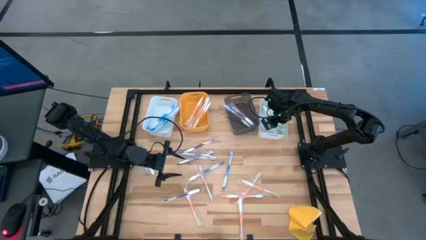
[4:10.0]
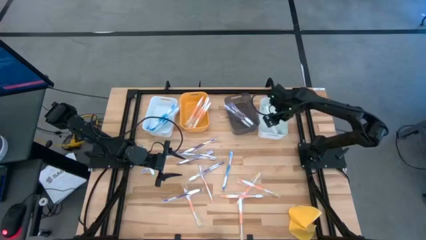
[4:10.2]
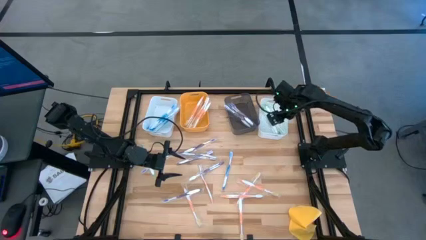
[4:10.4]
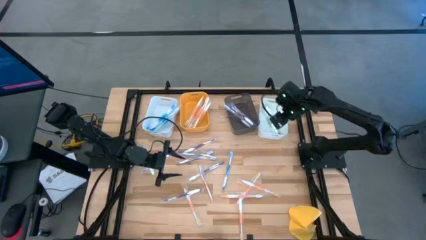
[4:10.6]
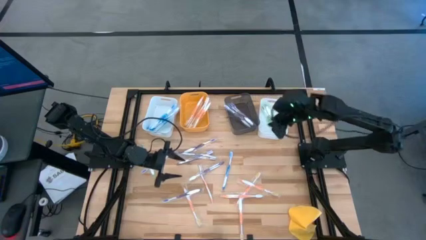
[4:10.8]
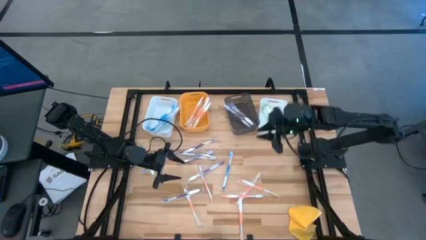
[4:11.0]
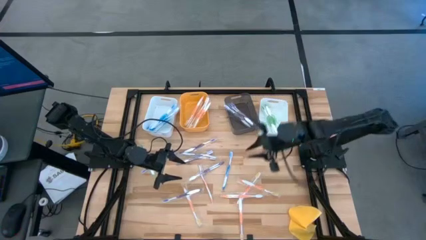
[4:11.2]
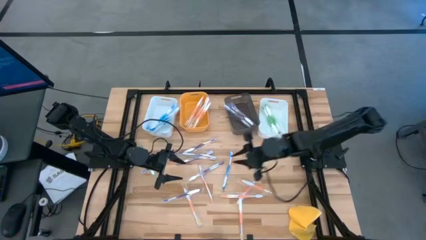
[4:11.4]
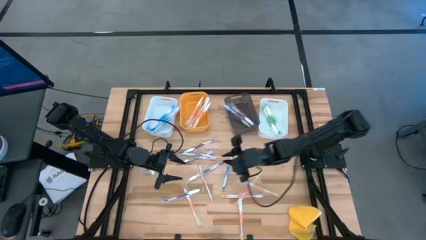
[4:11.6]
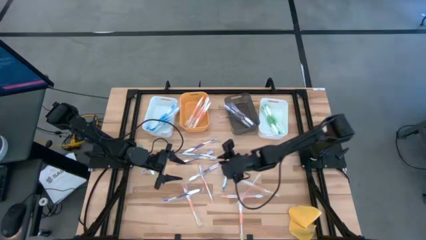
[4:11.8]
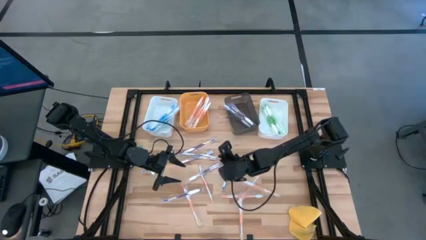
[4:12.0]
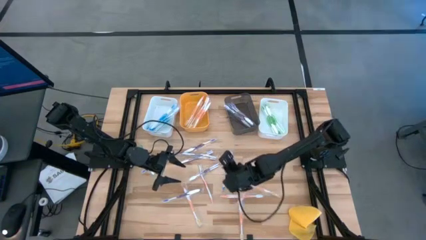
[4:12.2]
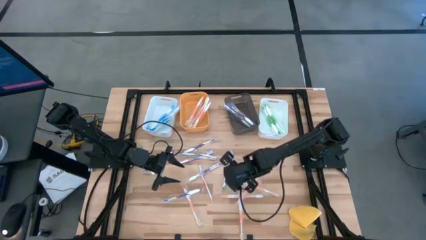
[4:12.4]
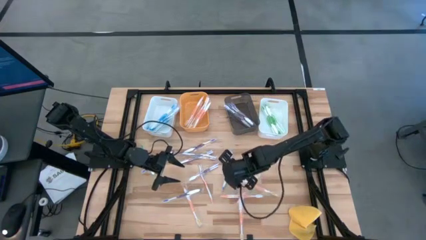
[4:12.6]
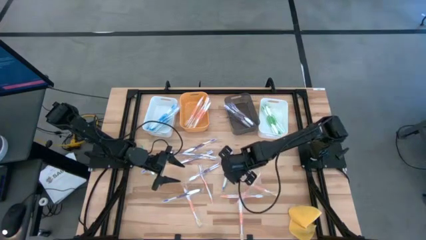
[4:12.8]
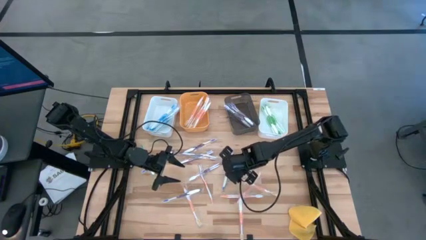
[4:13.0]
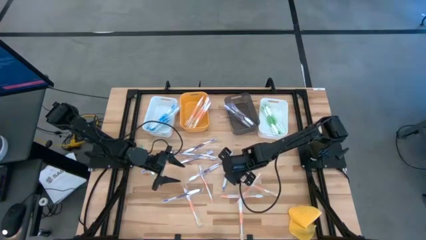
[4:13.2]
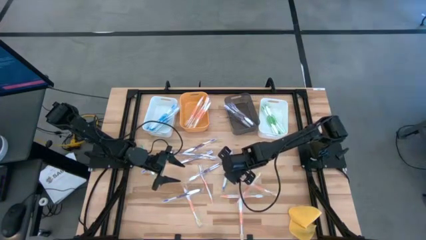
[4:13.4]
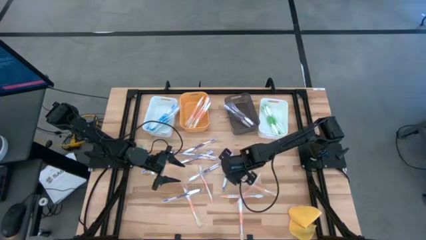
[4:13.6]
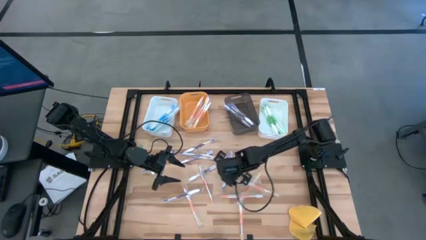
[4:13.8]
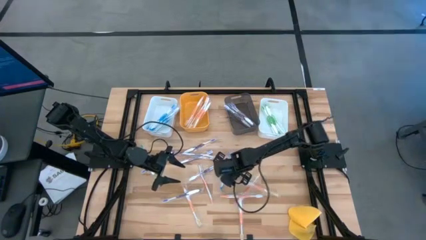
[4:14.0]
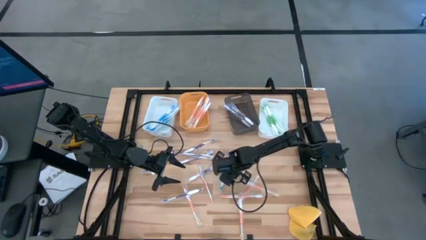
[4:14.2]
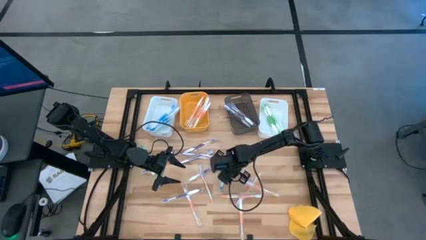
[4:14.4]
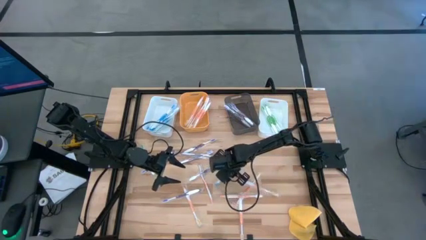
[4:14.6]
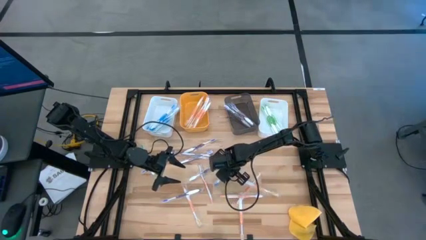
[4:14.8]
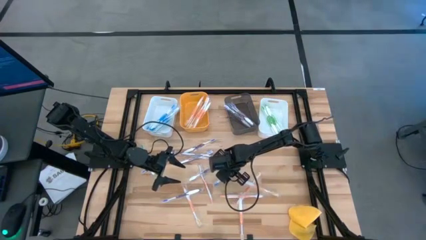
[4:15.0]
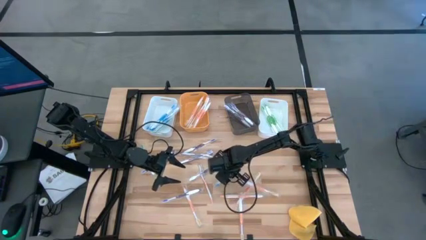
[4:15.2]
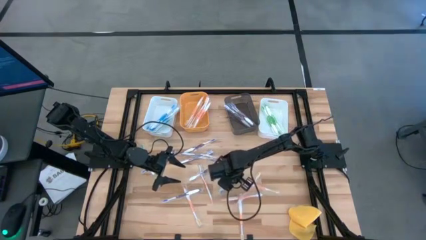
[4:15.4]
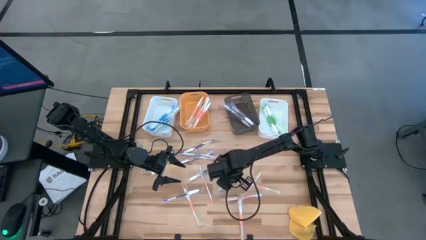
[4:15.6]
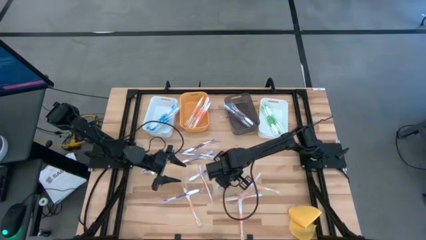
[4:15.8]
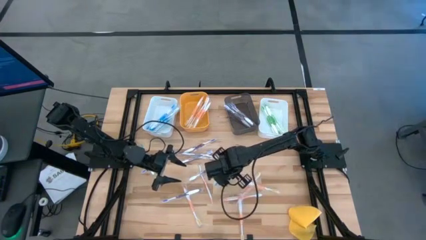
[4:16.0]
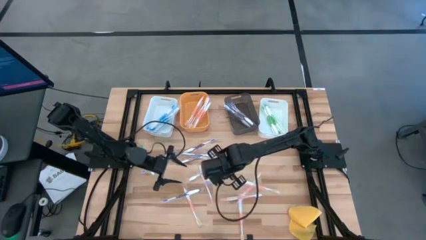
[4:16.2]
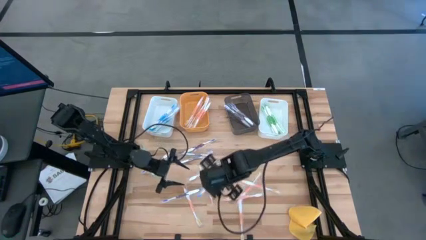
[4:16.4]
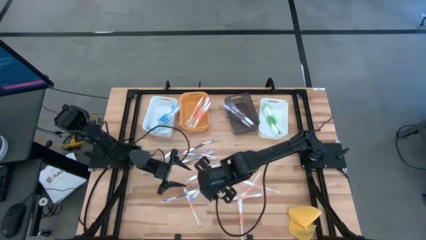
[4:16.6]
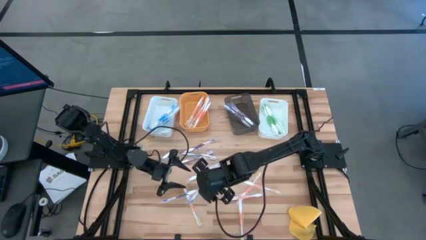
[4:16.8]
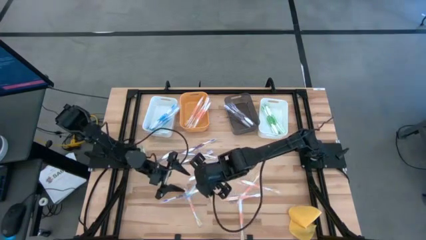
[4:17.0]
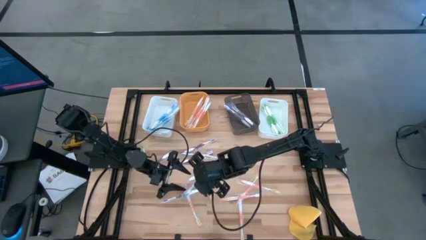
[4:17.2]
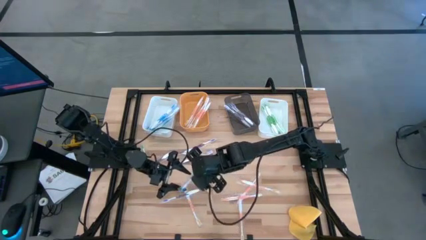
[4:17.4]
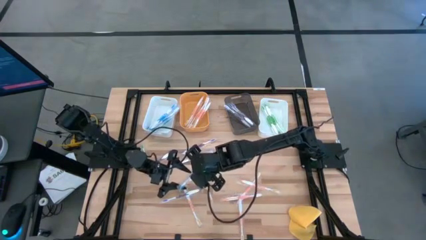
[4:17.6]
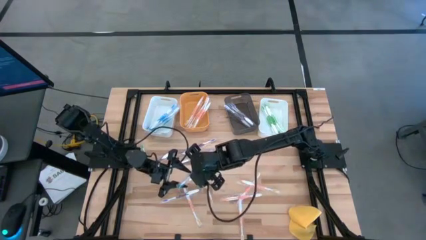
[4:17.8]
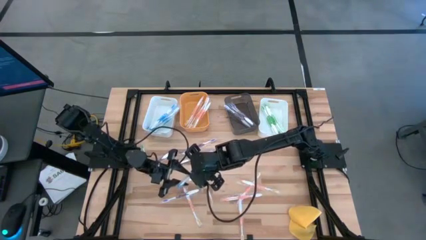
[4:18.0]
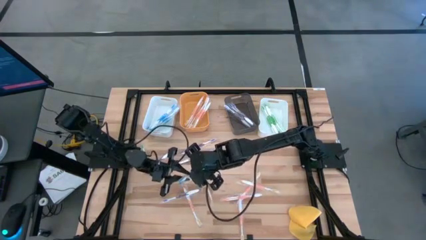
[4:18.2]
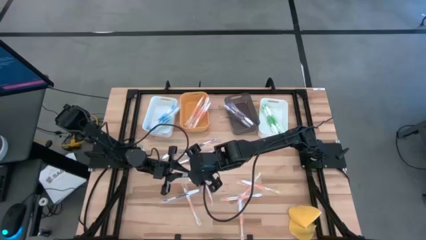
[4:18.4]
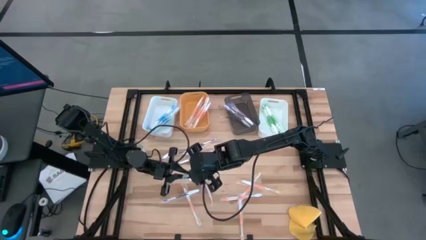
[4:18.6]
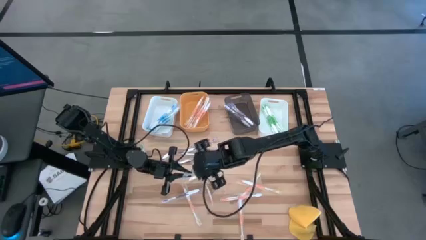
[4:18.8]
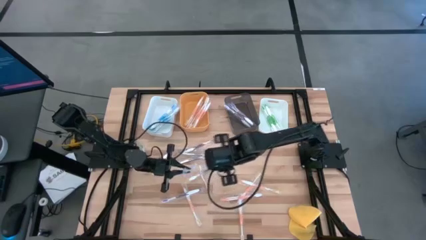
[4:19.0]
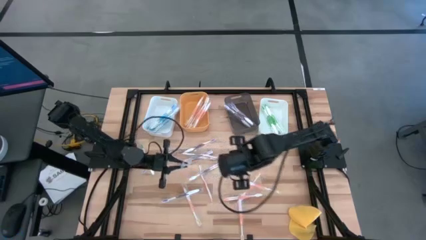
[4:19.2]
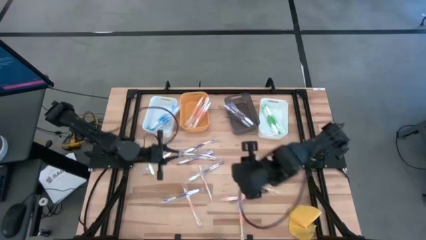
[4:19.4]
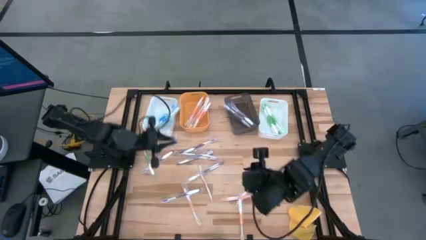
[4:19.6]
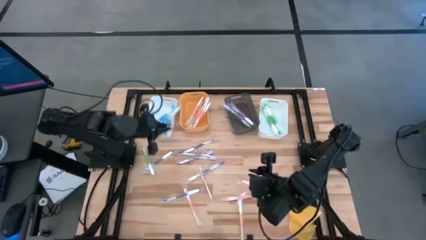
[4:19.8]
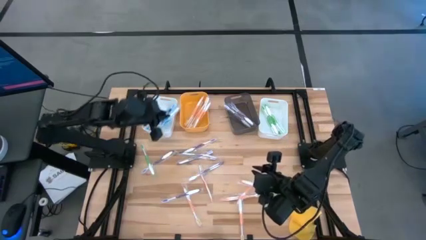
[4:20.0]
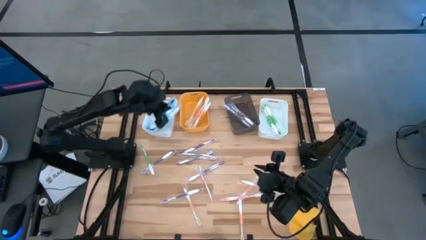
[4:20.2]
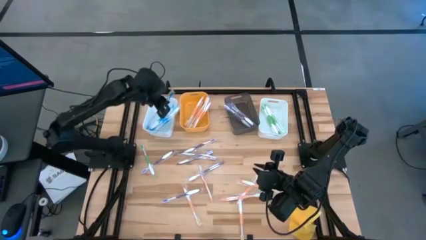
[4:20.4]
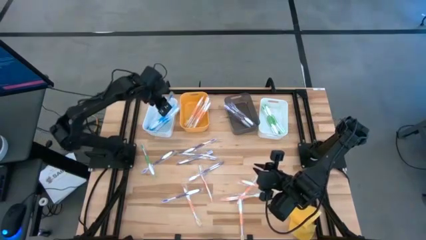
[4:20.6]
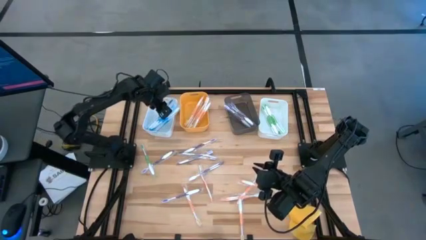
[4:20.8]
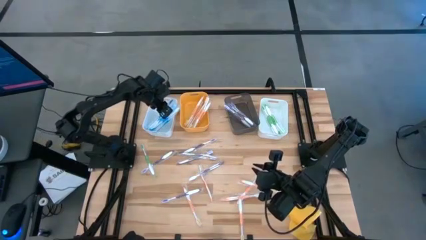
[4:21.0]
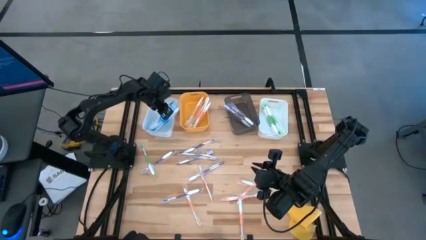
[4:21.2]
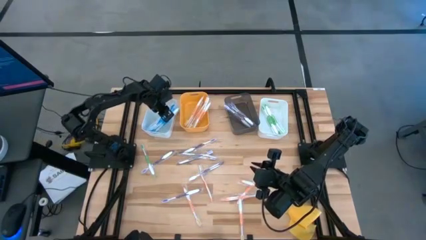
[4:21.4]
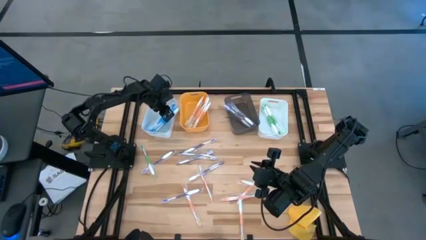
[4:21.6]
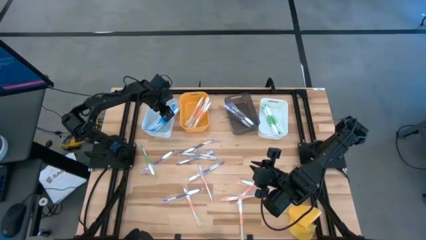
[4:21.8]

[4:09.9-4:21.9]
Task: Pick & Place Toothbrushes
Put the blue toothbrush into the left white bin

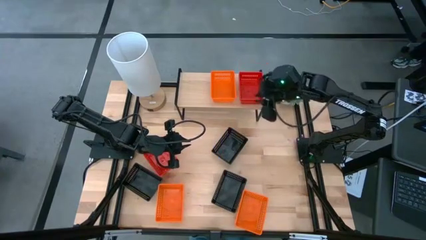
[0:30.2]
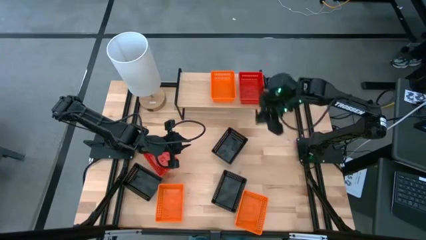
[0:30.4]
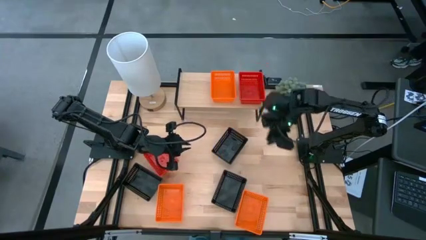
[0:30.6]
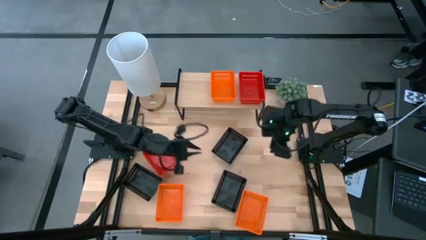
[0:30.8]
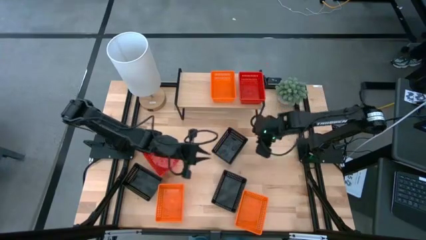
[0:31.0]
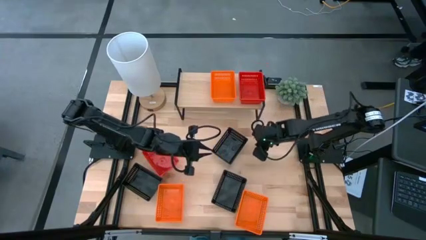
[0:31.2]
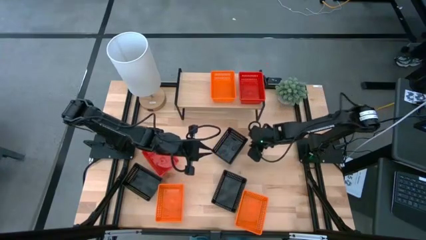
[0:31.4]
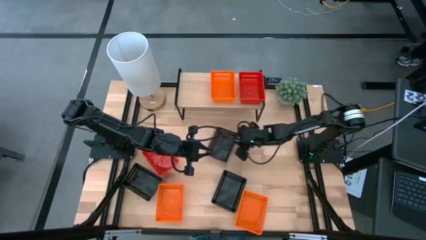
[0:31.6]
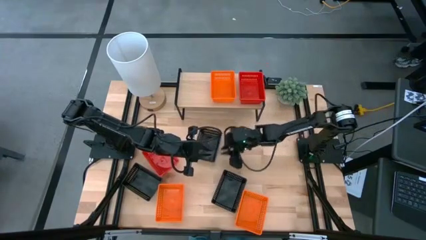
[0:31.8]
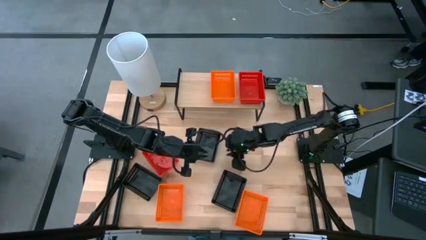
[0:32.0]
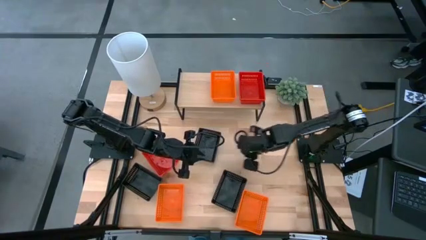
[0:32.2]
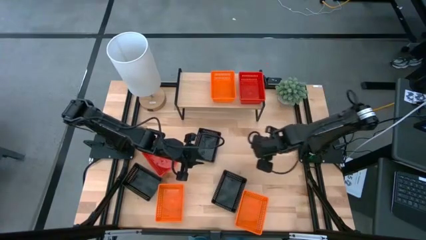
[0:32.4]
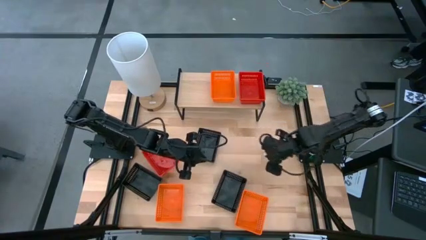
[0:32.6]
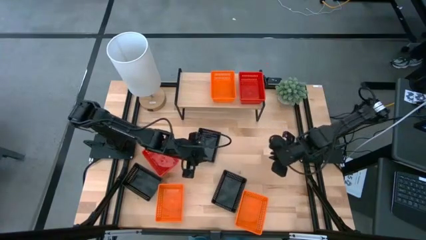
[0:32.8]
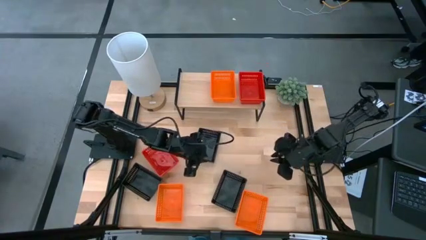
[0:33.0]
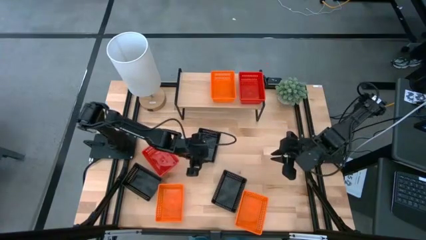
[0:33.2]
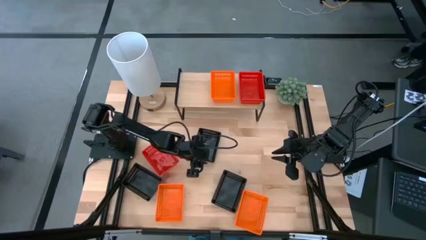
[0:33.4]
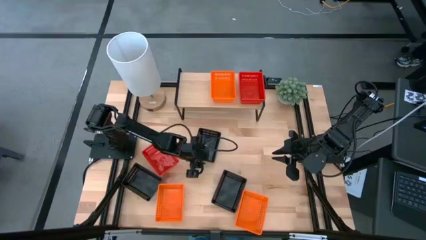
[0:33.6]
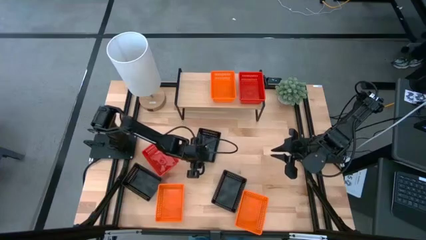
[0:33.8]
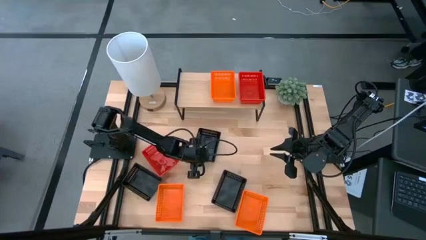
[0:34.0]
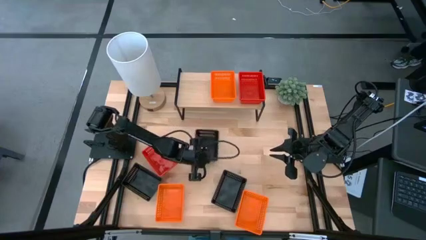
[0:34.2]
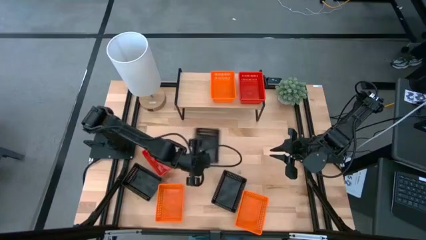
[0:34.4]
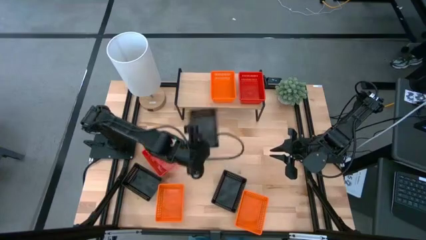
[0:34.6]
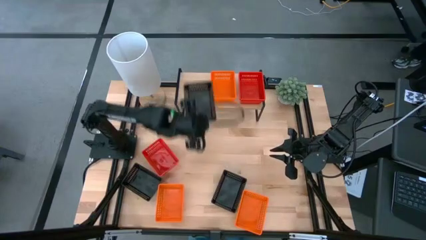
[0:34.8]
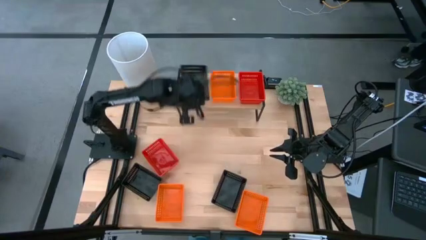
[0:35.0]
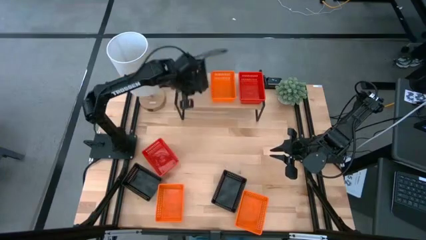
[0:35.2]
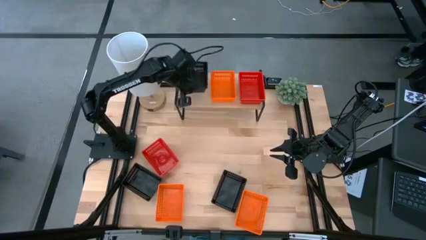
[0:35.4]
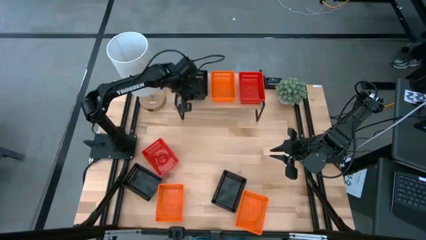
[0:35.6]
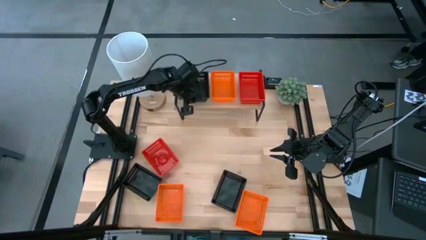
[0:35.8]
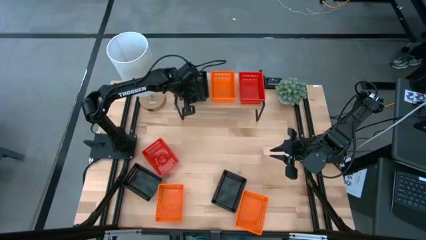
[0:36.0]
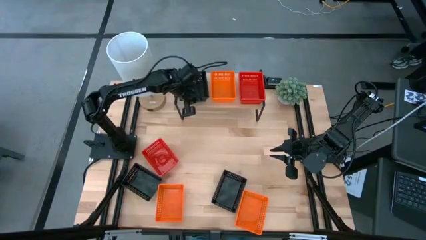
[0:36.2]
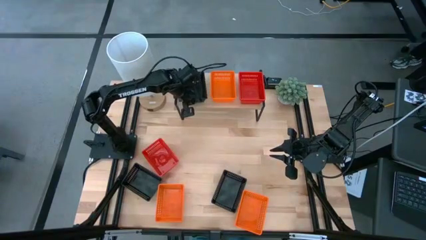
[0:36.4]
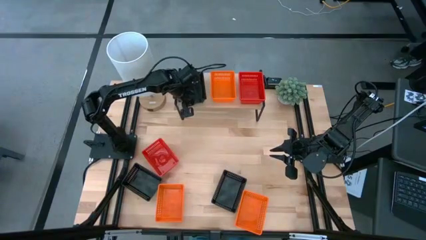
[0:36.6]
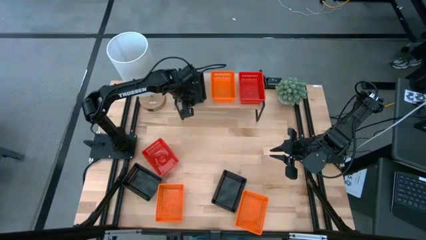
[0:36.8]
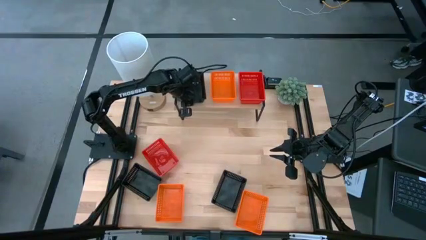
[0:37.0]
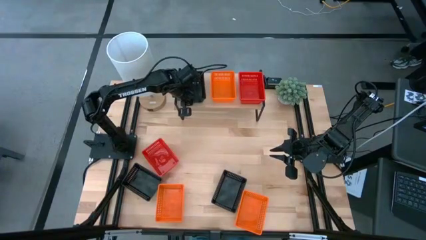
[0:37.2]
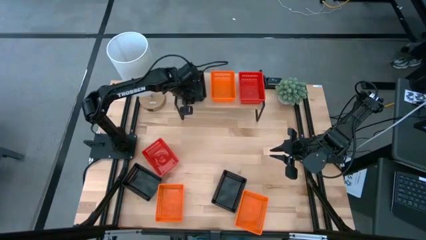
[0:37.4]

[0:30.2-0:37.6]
Task: Stack baskets on shelf by color
Put the top right black basket on the shelf
